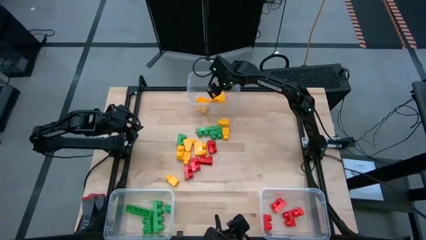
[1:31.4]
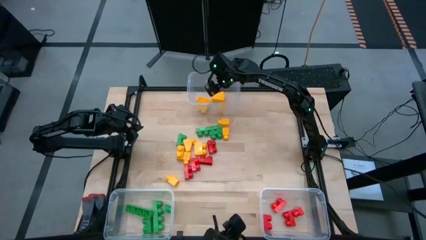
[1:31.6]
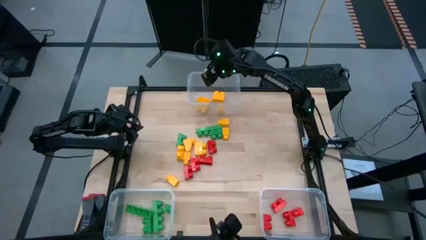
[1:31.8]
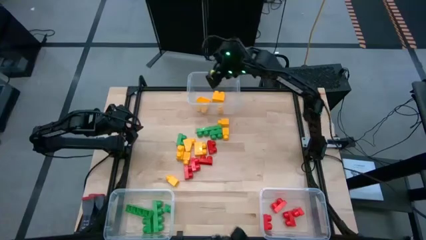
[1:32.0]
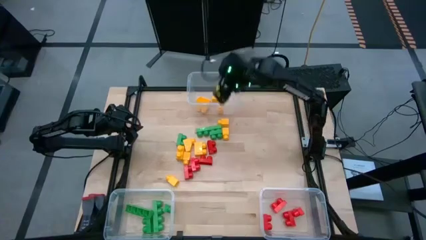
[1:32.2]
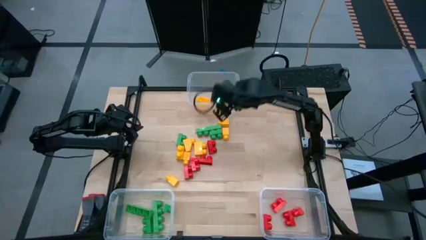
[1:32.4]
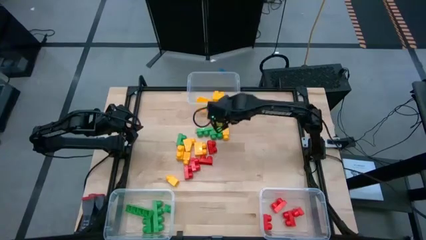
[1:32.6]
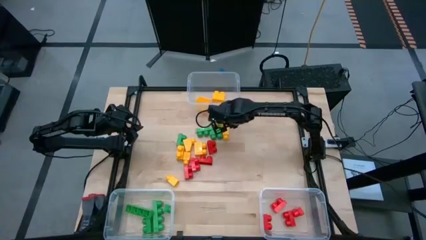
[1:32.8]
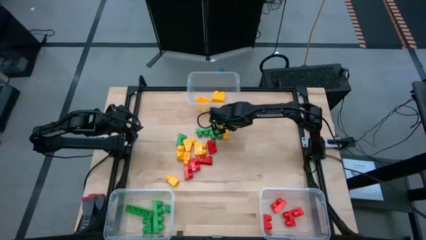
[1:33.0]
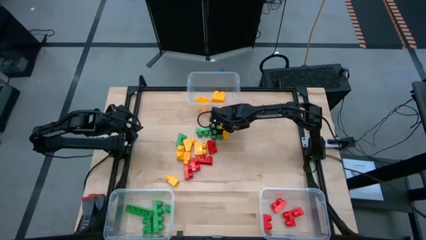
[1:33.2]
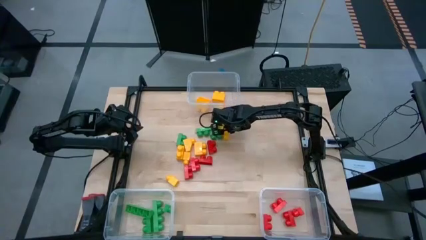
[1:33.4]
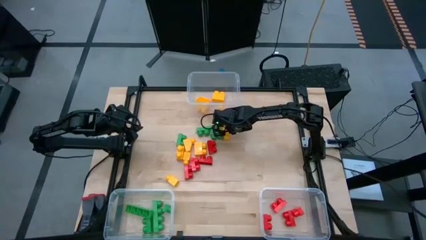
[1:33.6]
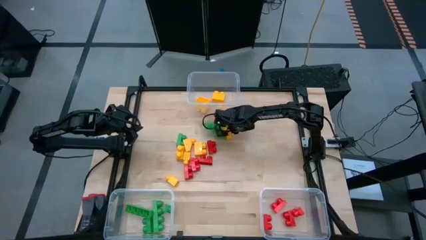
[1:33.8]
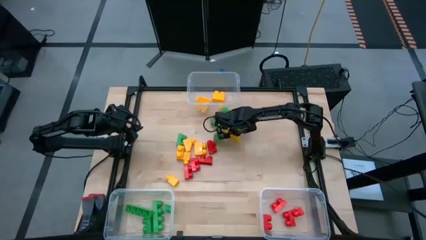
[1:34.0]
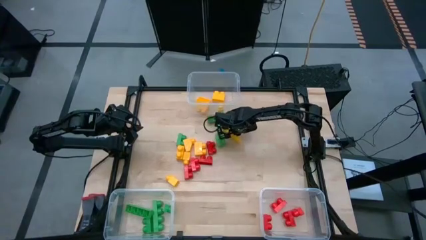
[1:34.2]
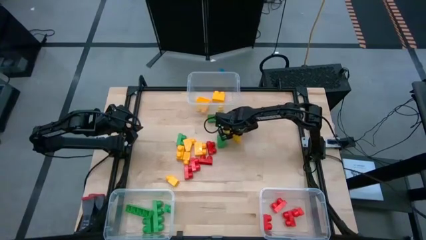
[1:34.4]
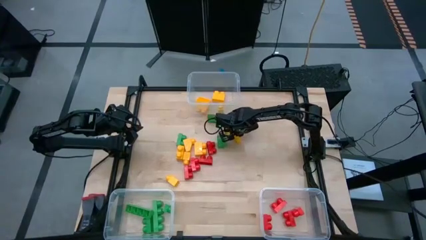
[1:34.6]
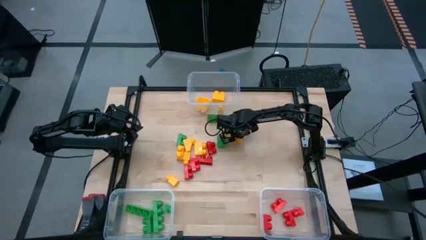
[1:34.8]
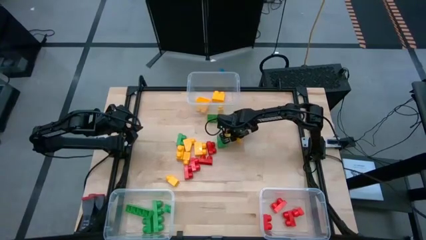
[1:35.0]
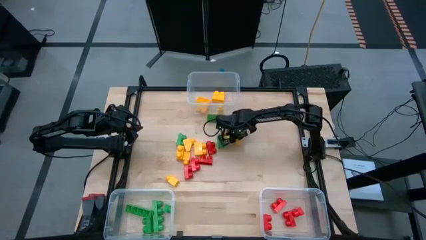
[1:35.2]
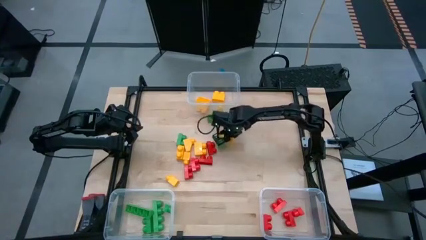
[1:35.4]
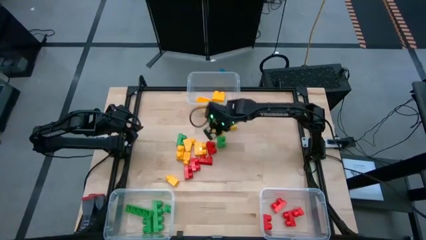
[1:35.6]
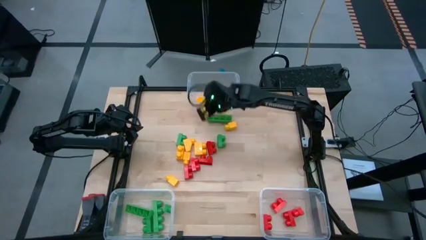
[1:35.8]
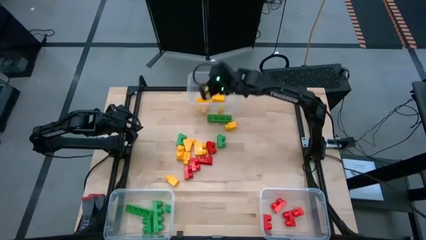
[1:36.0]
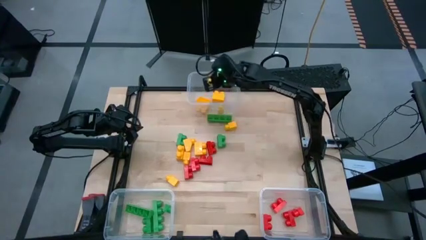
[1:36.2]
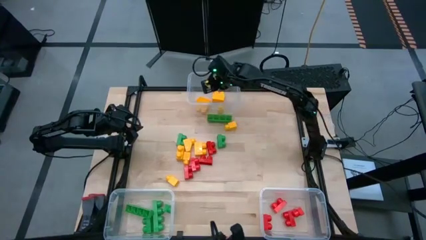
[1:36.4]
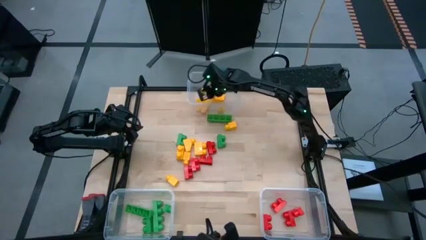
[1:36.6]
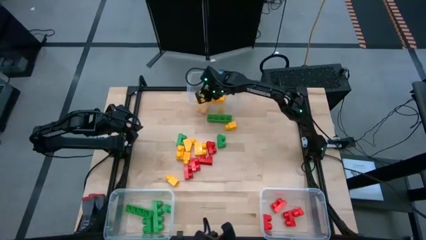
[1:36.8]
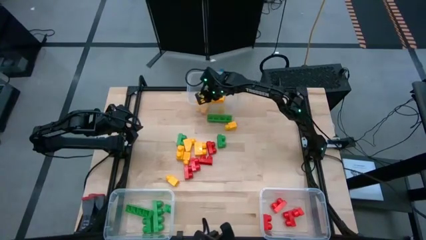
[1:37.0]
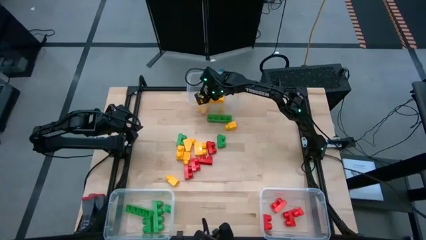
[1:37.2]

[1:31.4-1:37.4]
Task: Sort blocks
Put the yellow game piece into the top transparent bin

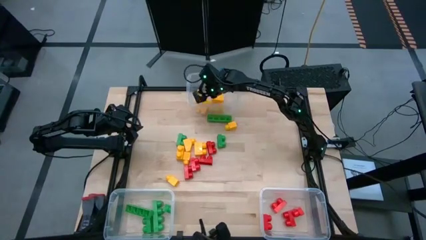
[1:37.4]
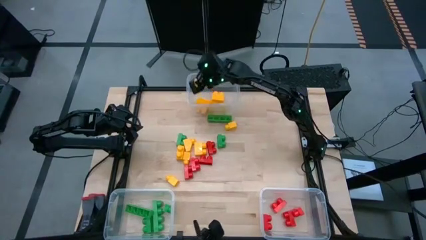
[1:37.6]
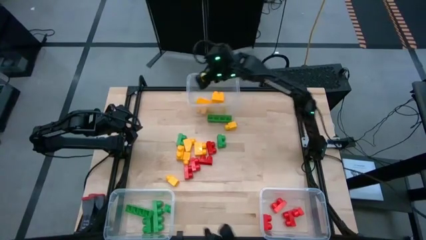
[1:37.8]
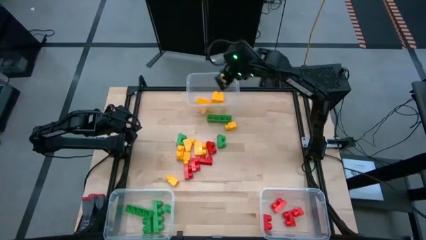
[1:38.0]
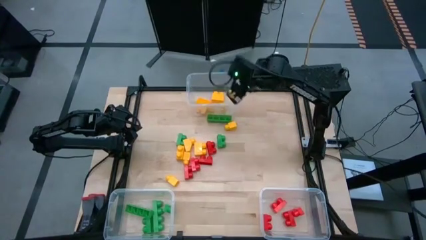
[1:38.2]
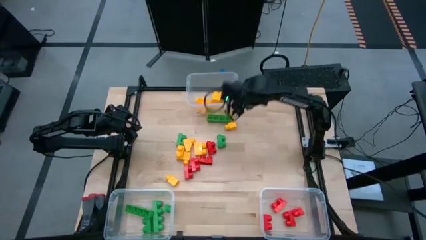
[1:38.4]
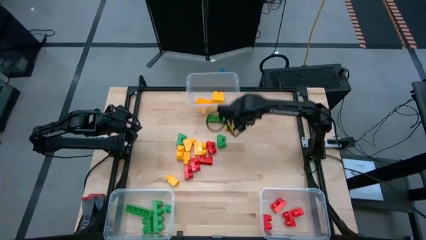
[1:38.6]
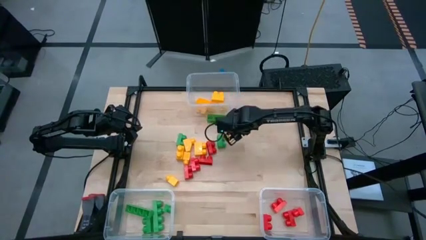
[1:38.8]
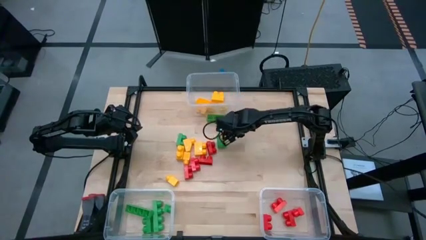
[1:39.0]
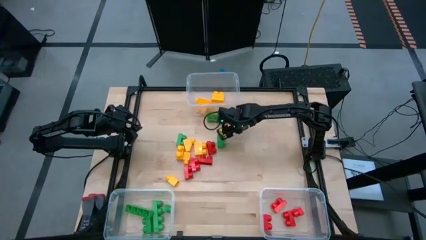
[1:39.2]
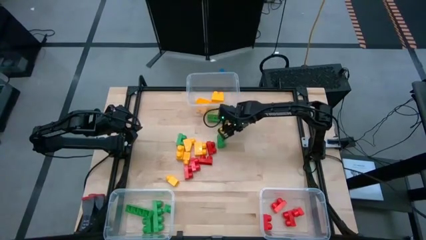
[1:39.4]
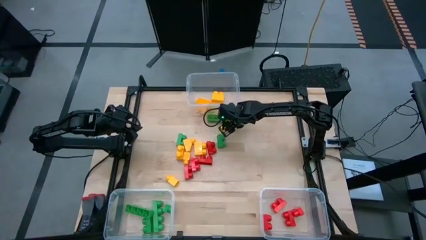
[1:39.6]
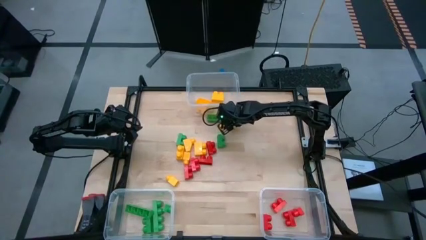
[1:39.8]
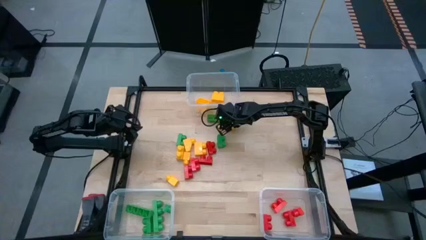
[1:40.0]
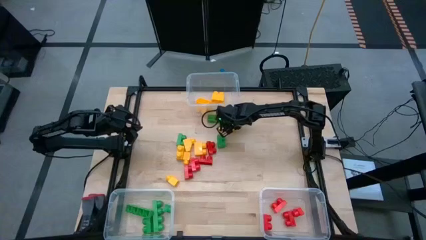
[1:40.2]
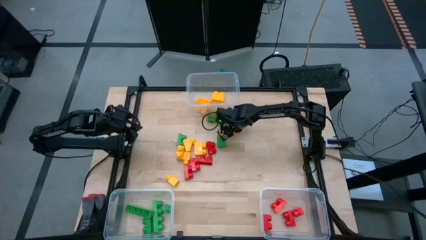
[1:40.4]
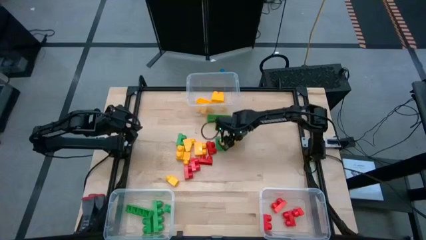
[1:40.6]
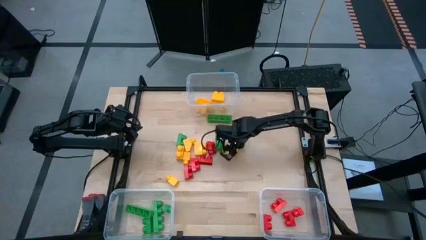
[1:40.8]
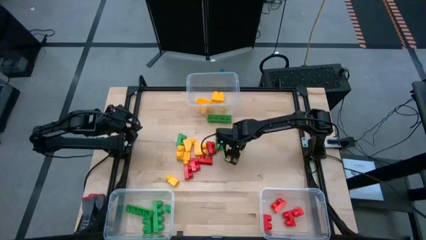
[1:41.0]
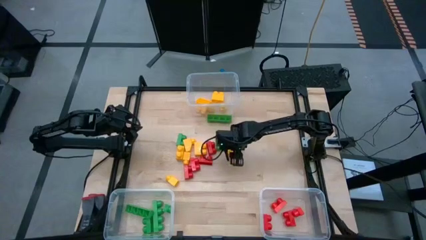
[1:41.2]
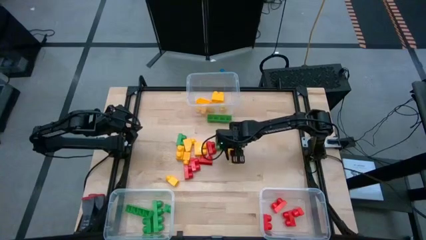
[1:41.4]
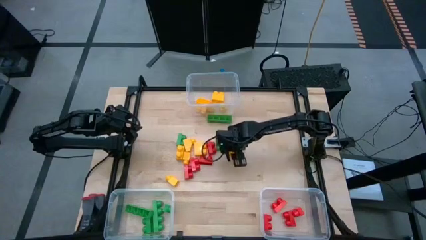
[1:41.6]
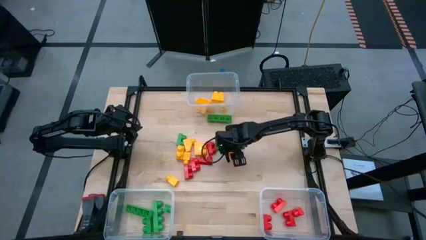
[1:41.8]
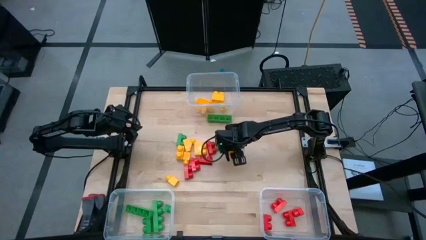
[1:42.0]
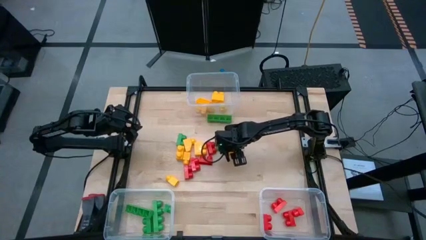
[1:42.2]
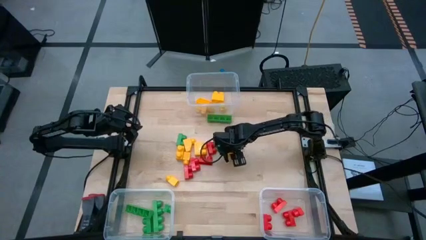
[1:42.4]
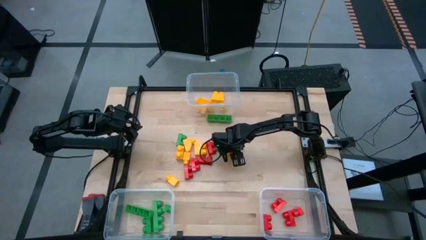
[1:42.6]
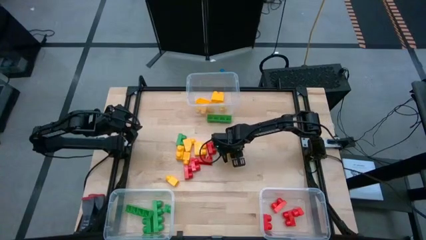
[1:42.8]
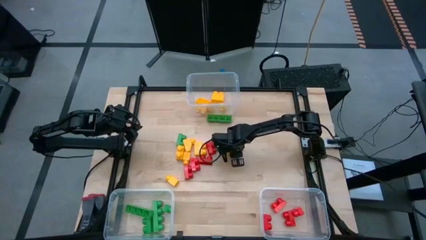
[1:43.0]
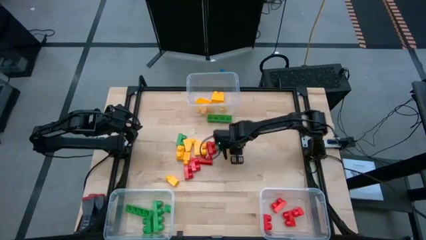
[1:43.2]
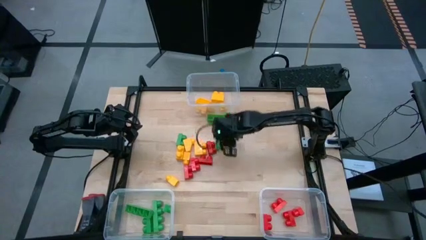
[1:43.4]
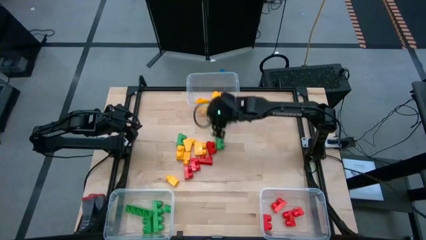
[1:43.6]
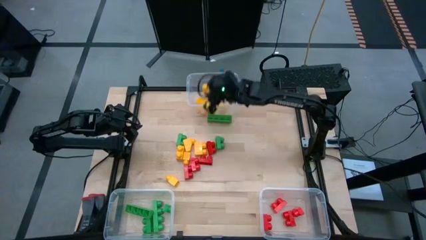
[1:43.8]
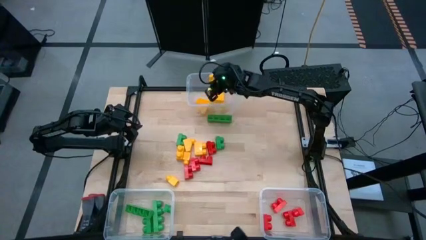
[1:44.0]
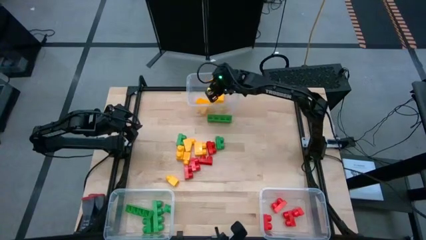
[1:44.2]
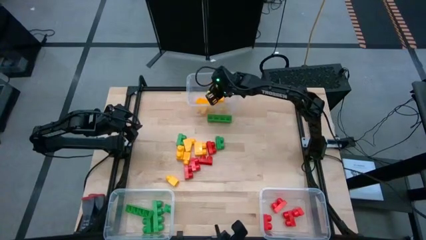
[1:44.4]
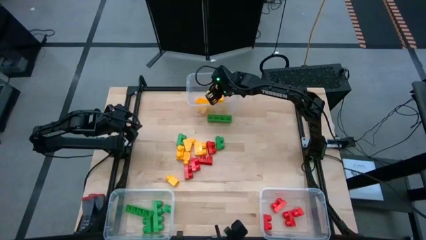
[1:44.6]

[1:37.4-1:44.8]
Put the yellow game piece into the top transparent bin

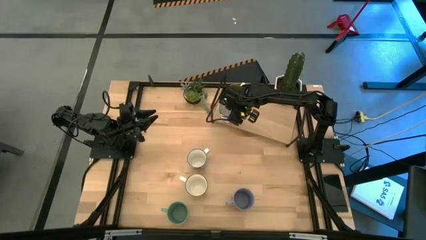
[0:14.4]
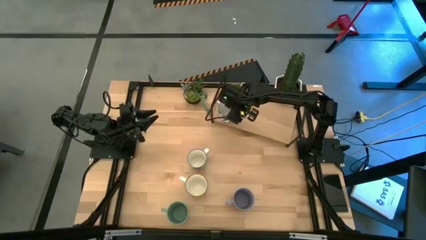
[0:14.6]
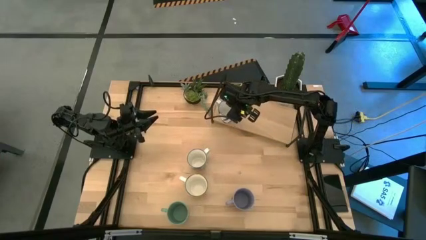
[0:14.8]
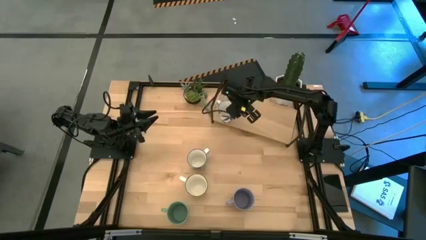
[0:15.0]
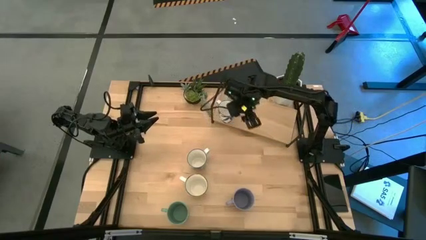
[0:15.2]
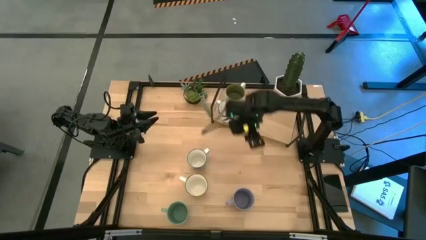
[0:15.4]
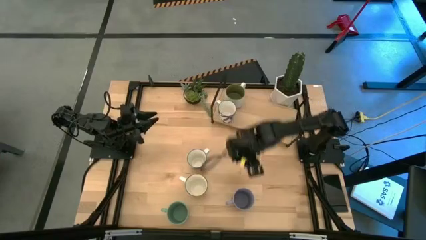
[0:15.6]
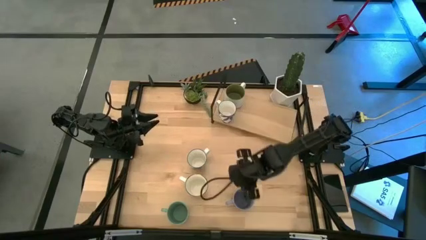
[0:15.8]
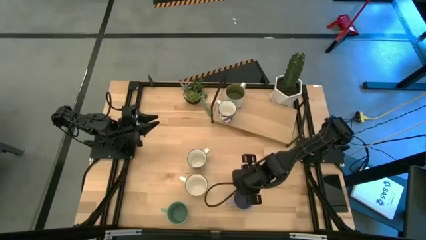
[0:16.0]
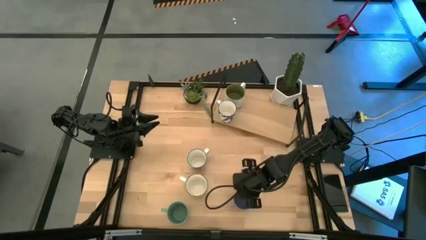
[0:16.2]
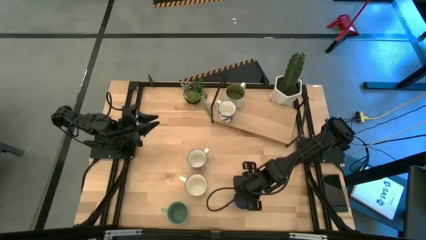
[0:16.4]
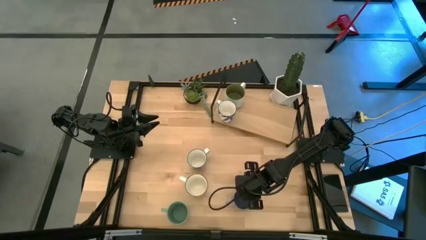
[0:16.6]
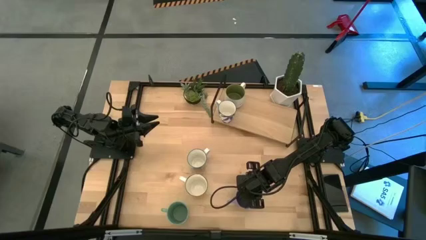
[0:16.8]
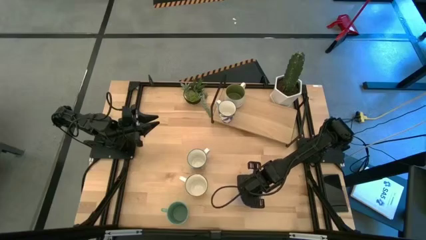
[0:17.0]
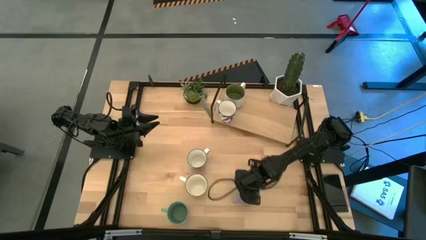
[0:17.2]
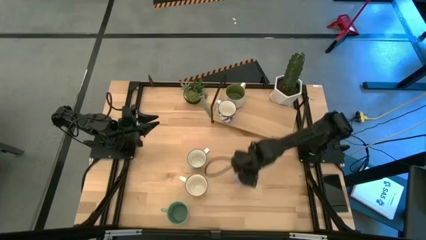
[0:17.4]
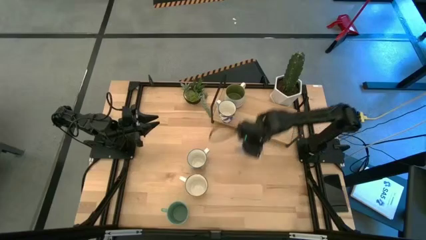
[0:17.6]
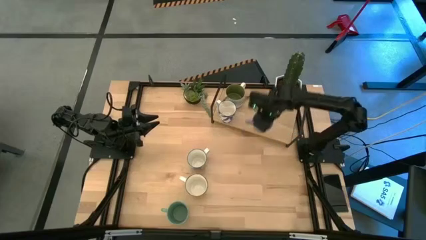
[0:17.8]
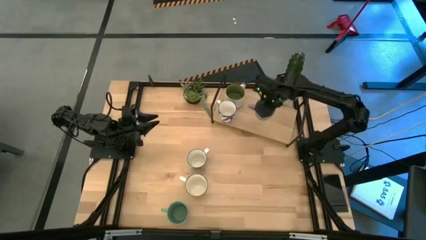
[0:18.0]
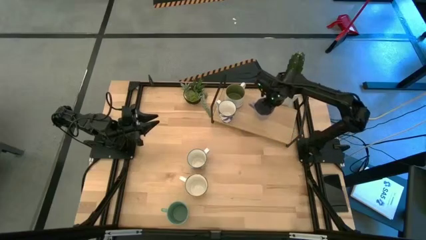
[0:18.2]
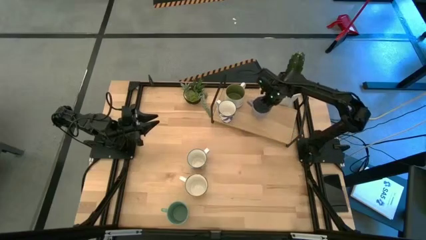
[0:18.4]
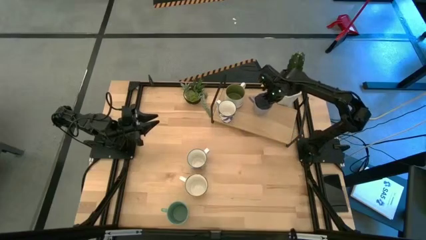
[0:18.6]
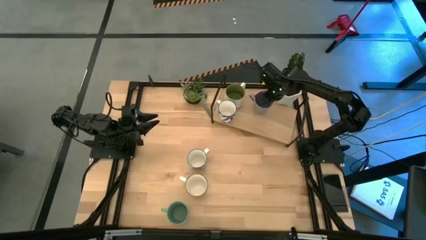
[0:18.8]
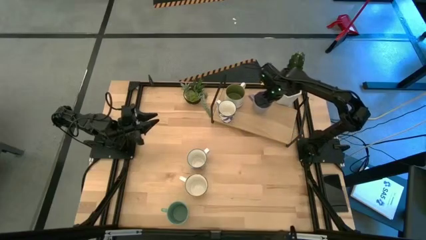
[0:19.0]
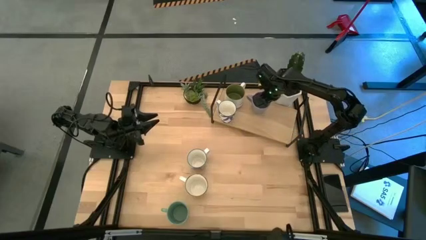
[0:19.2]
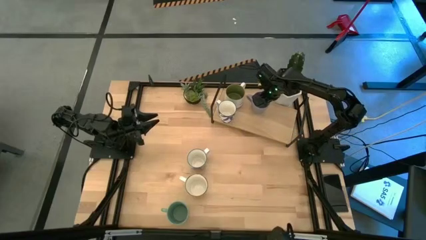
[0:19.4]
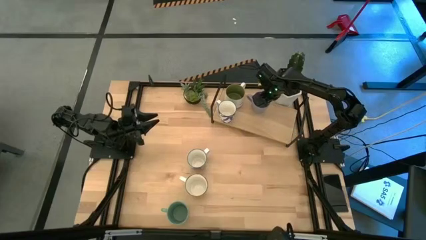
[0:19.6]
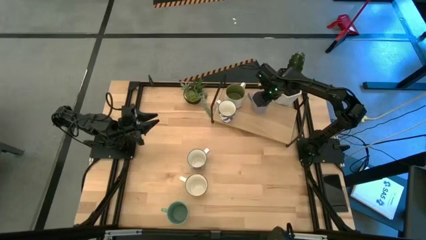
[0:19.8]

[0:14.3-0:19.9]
Task: Place coffee mugs
Put the light blue mug on the shelf
